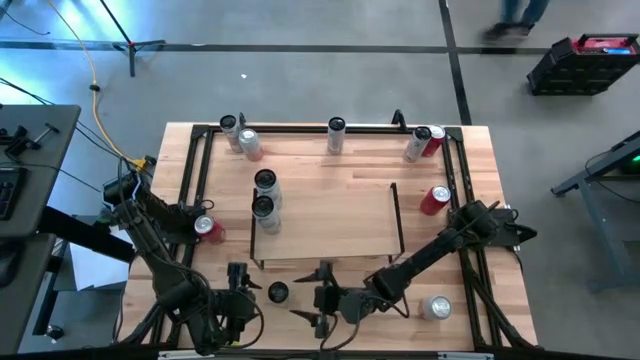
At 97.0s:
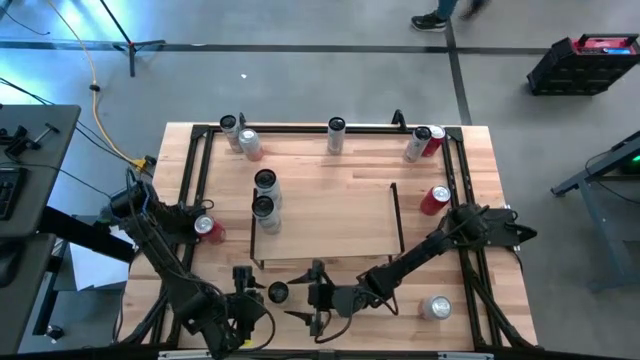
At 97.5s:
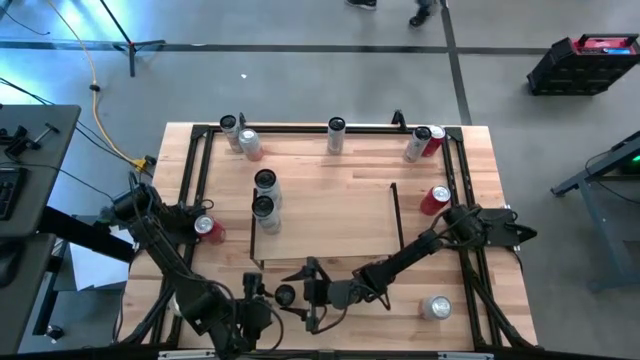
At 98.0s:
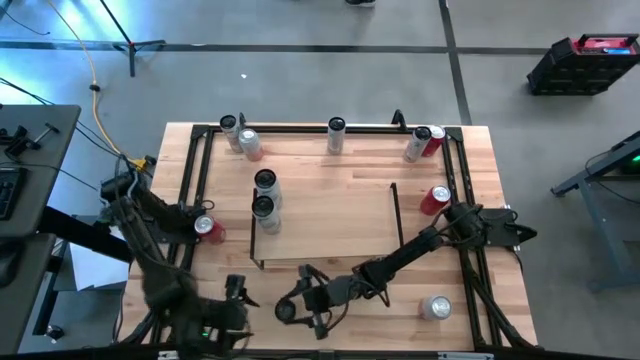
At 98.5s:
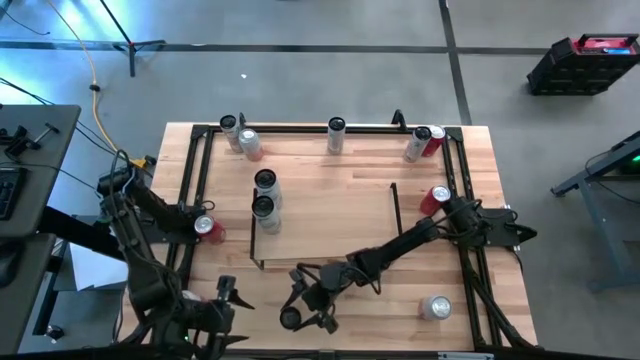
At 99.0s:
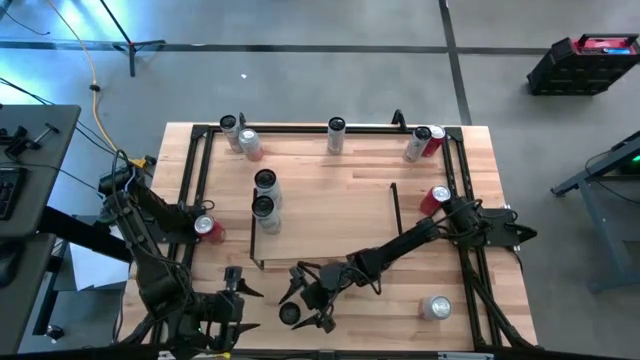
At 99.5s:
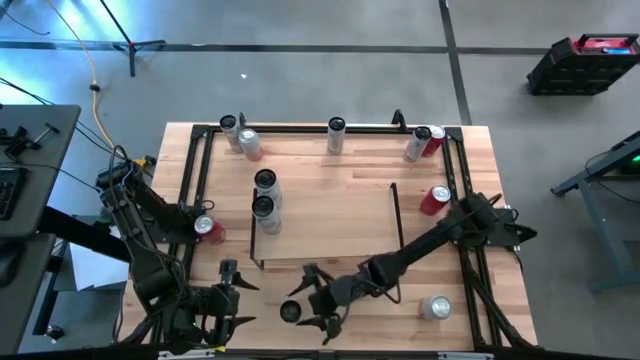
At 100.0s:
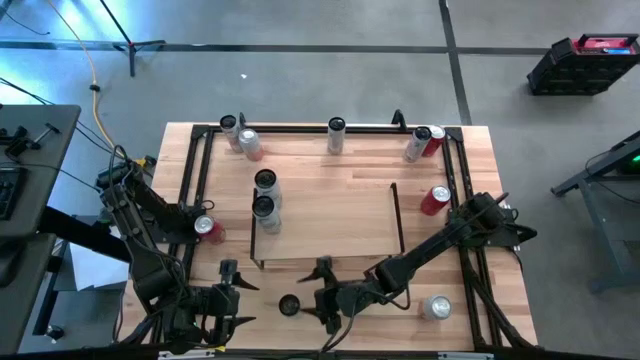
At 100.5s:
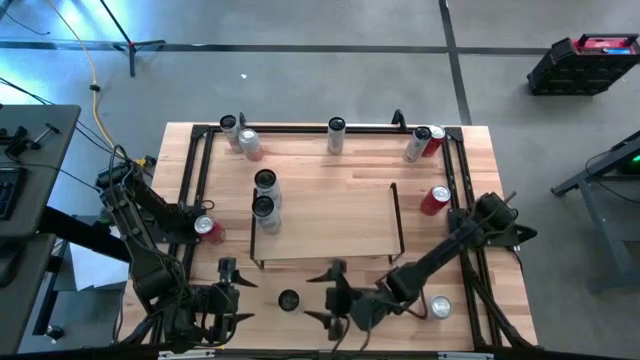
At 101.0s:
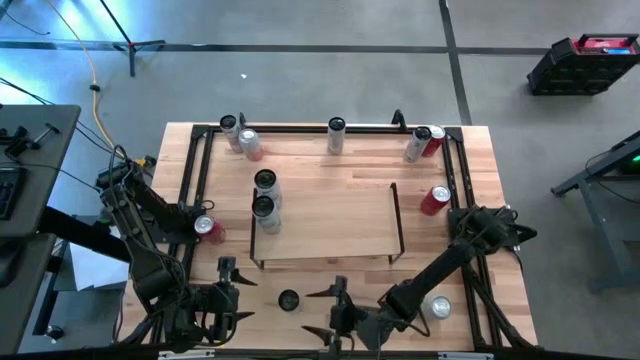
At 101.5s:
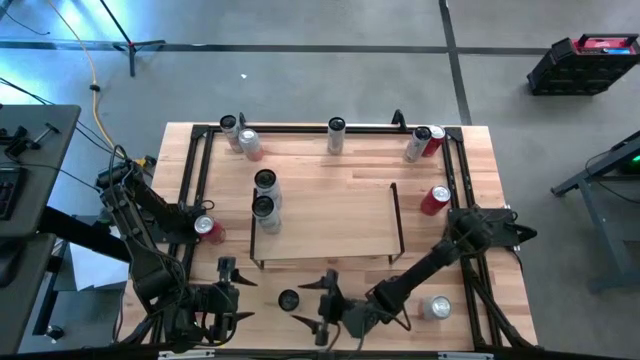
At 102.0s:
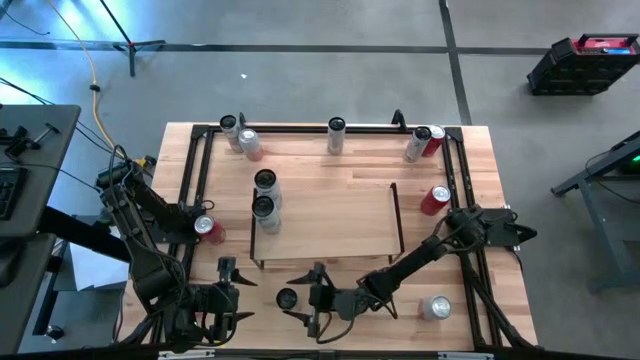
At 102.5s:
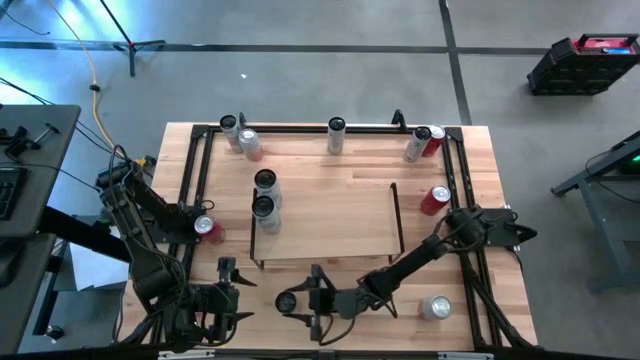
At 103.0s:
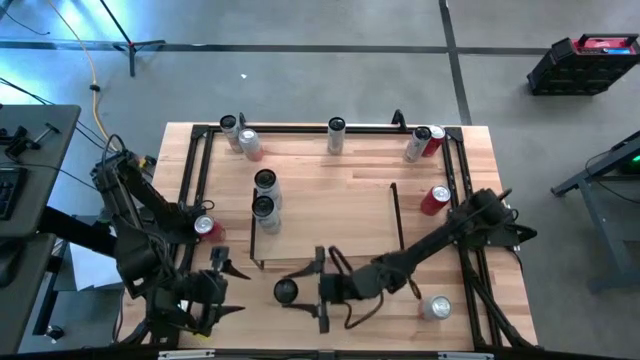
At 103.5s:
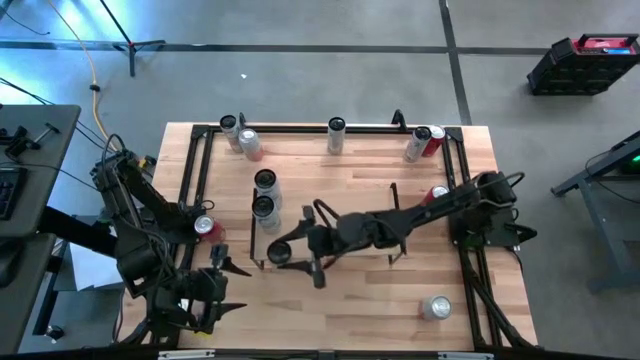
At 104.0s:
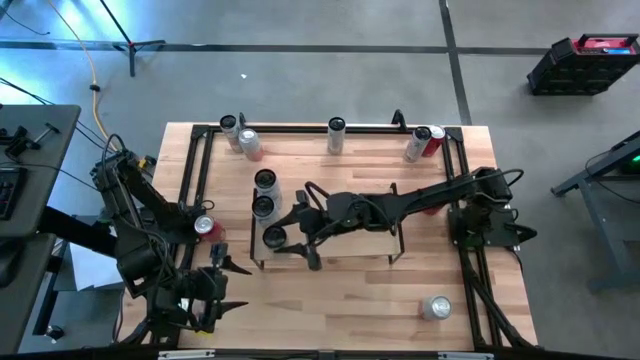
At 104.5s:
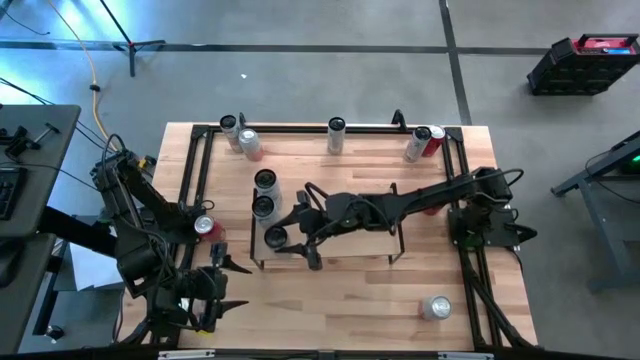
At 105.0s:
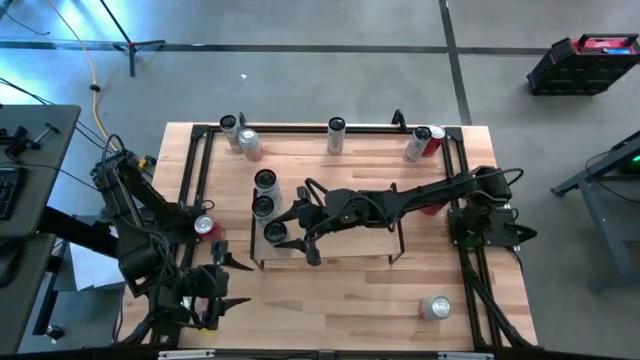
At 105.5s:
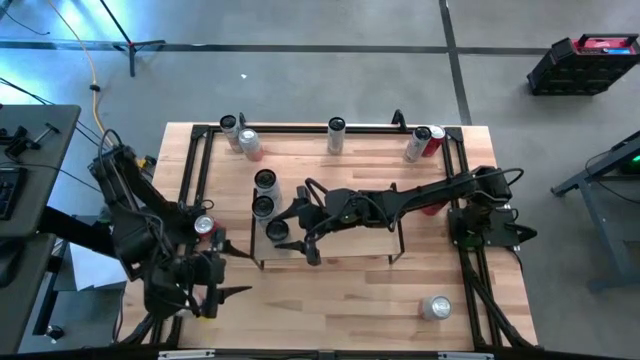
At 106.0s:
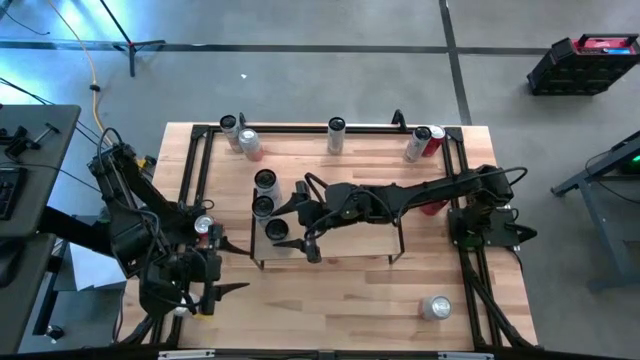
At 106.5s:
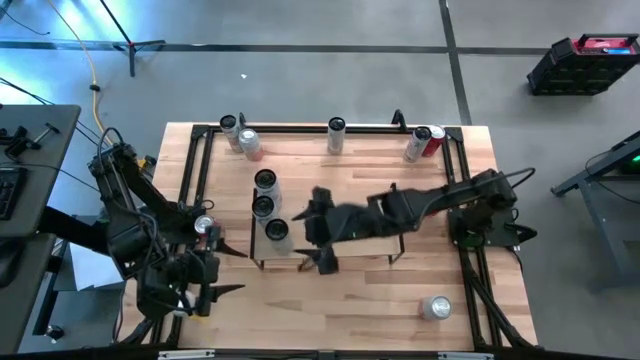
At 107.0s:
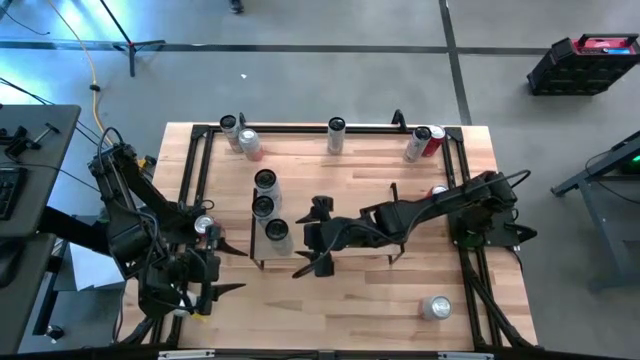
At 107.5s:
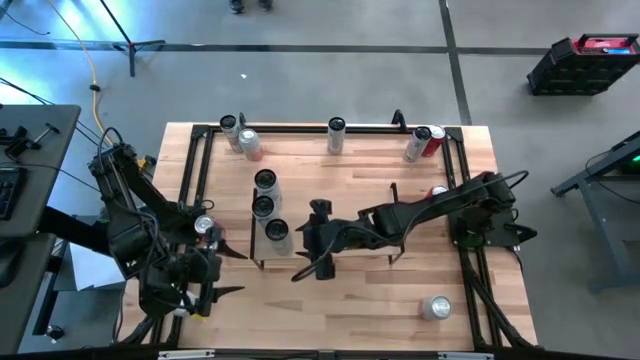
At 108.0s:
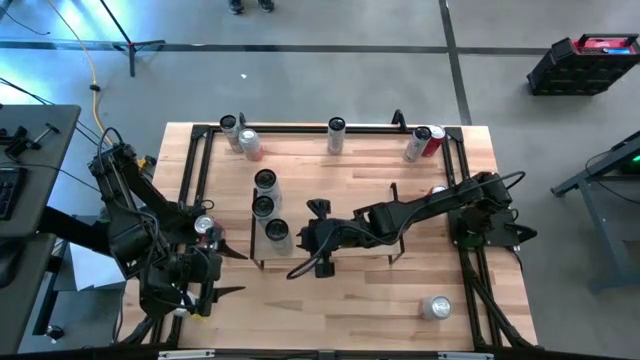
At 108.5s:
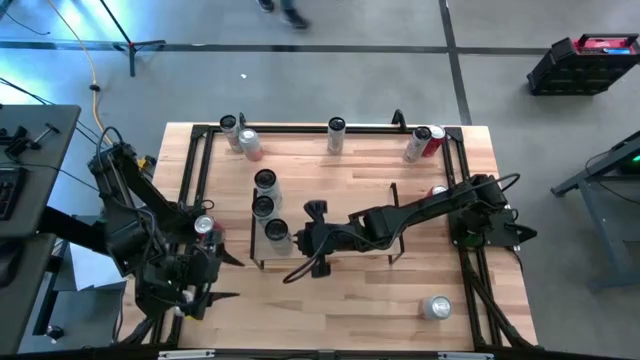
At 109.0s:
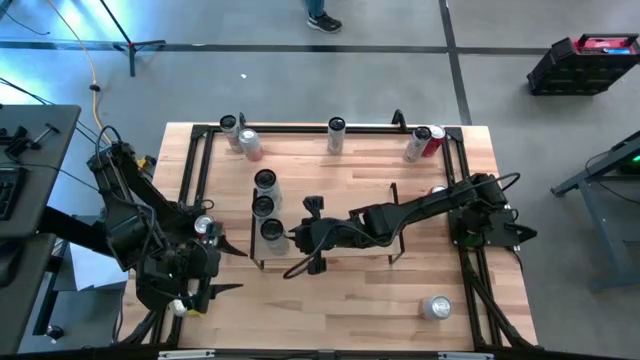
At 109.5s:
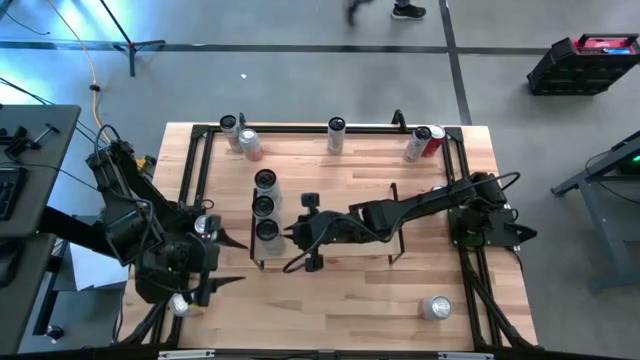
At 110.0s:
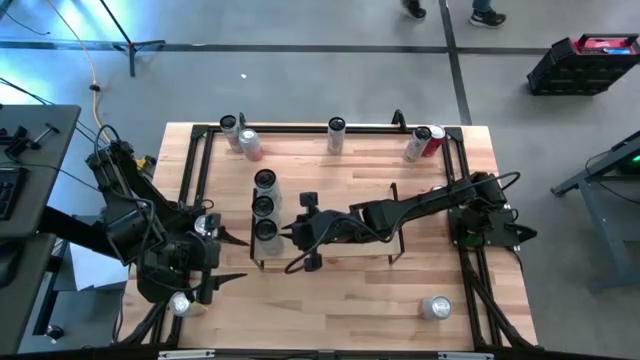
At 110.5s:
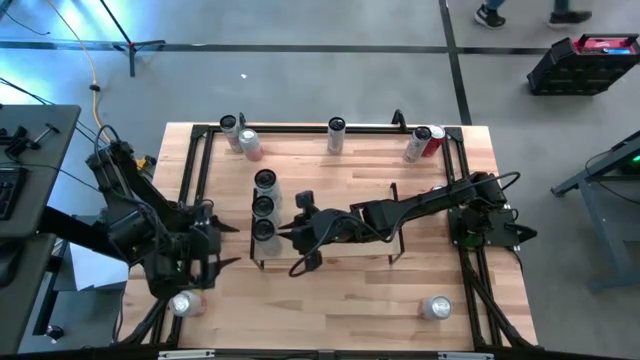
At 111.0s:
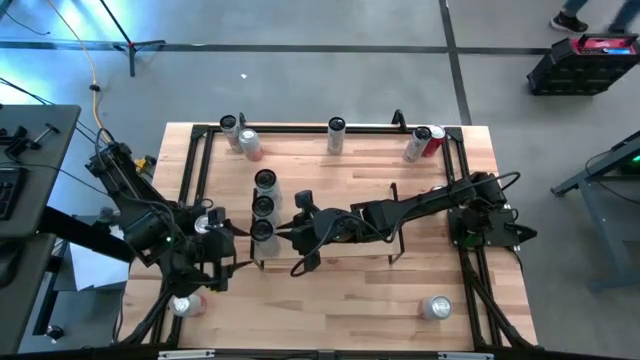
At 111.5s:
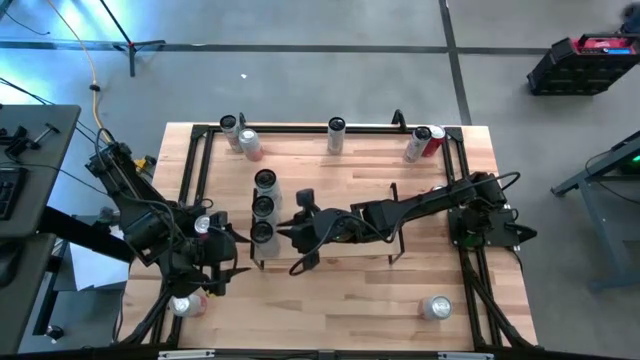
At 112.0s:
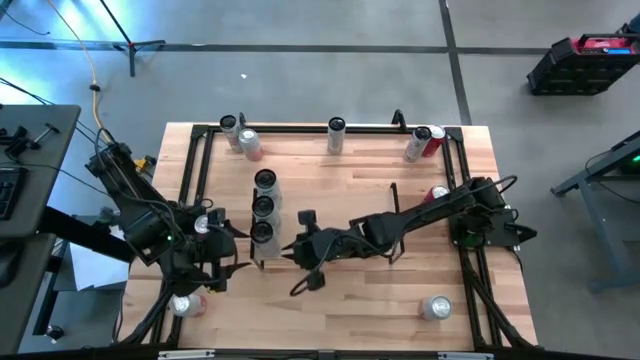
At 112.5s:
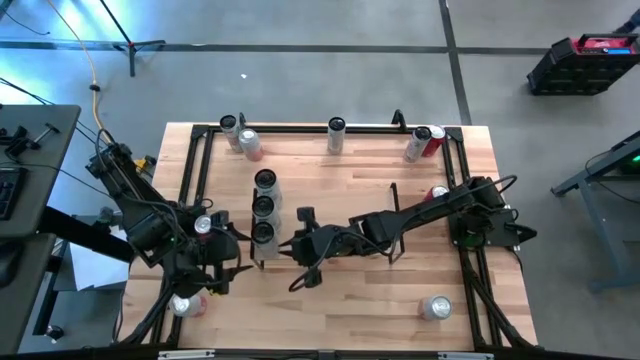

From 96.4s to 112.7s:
Task: Place canned beverage on shelf
Put the white blue soda can aligned with the other white blue soda cans on the shelf

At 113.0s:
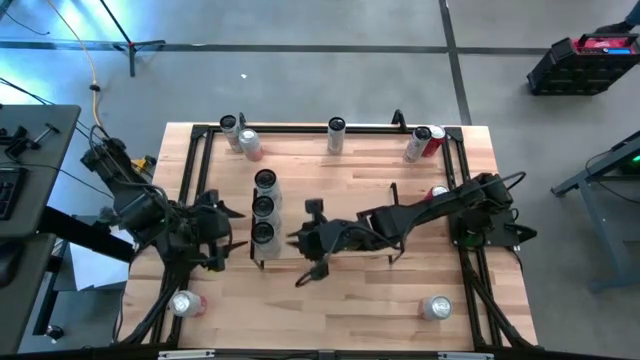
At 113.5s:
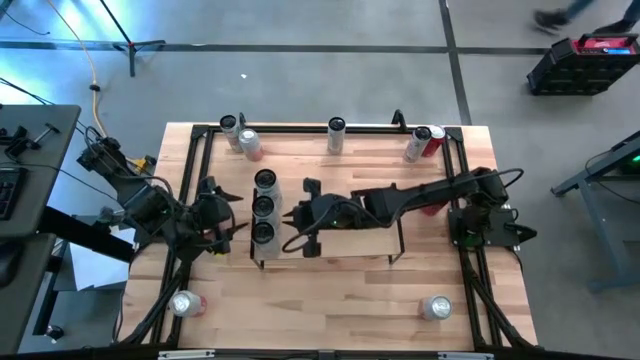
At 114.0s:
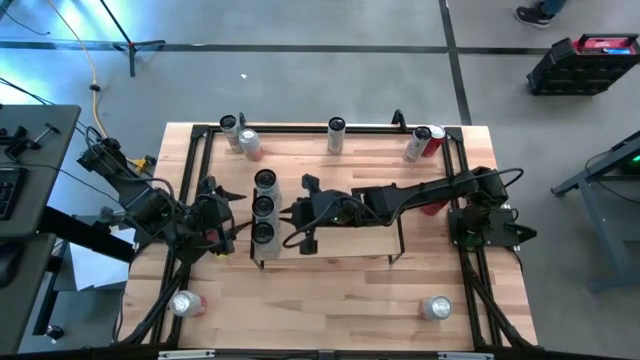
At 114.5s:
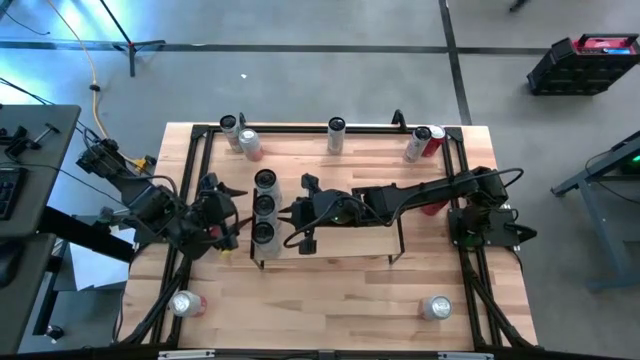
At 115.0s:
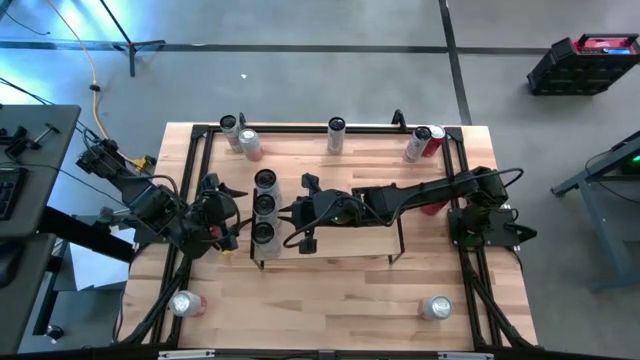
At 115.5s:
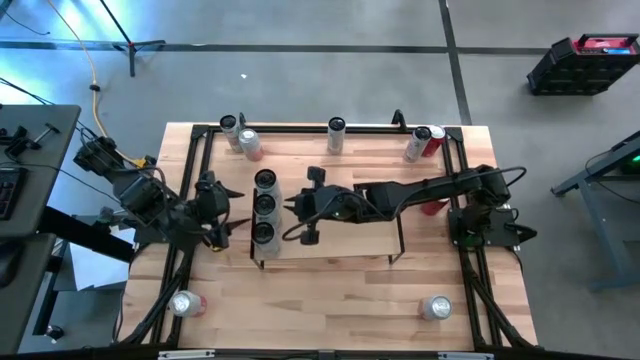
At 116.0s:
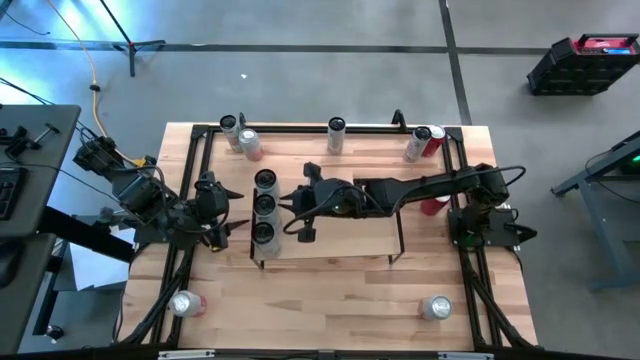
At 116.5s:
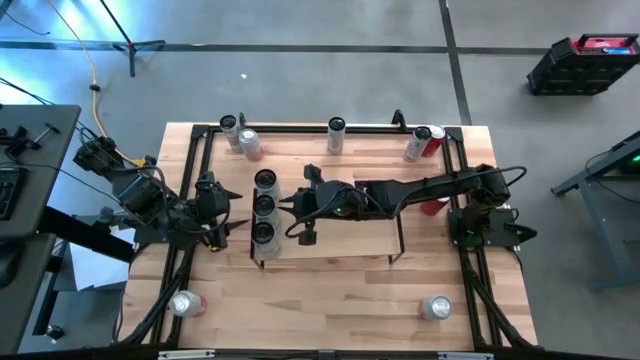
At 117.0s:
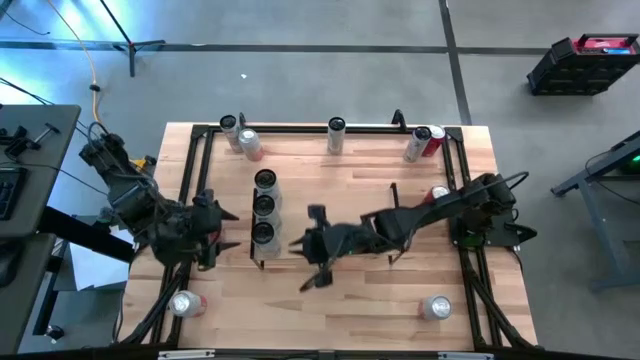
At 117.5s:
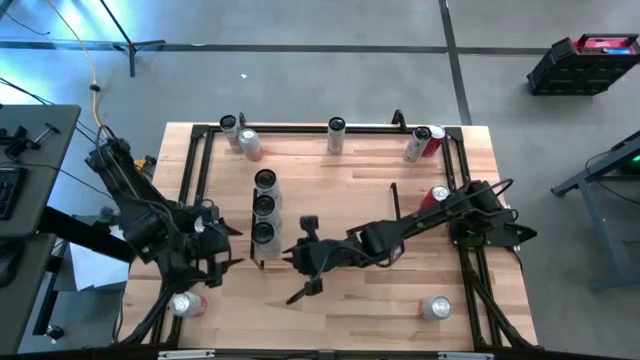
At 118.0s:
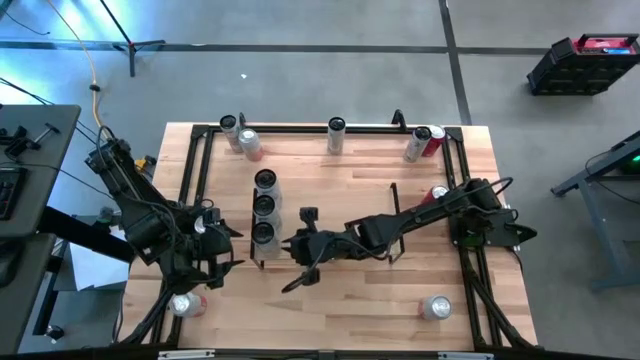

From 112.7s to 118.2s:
Adjust the white blue soda cans on the shelf
